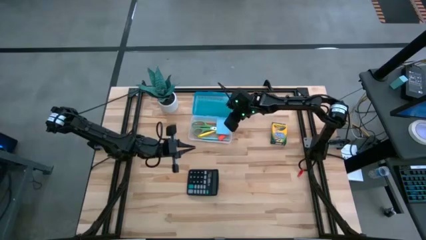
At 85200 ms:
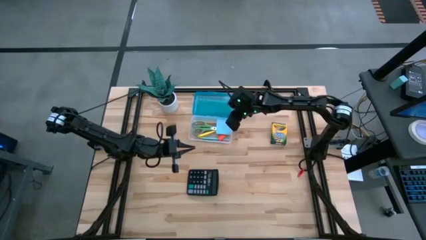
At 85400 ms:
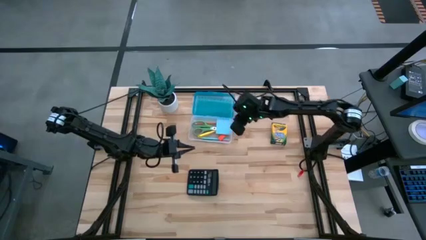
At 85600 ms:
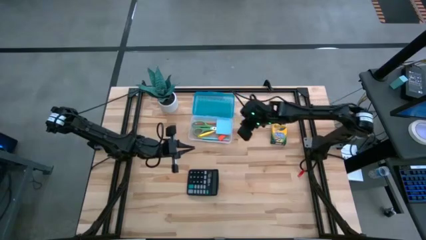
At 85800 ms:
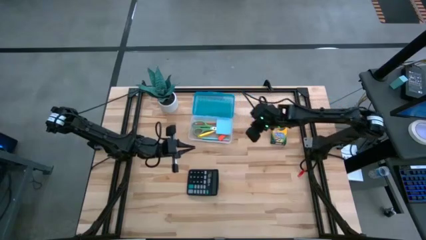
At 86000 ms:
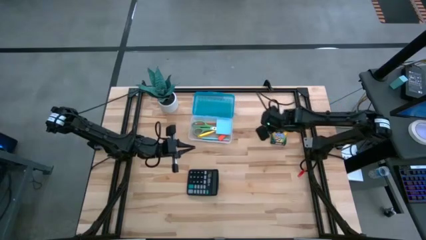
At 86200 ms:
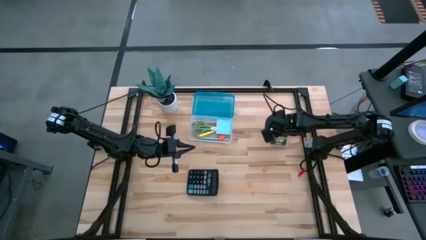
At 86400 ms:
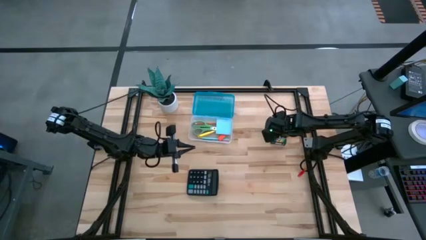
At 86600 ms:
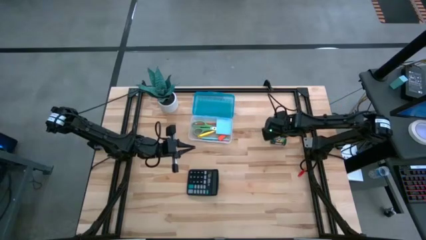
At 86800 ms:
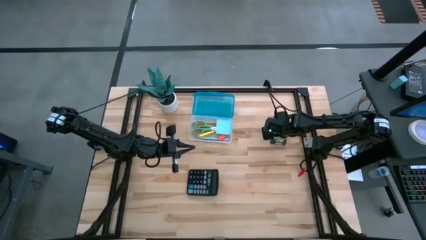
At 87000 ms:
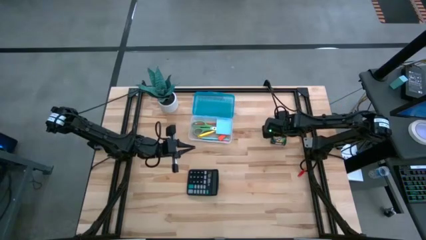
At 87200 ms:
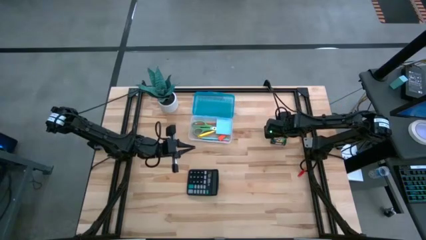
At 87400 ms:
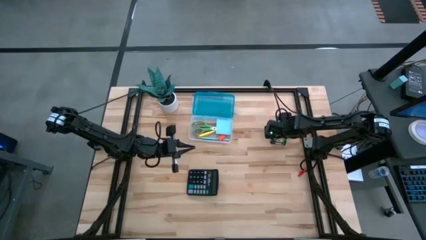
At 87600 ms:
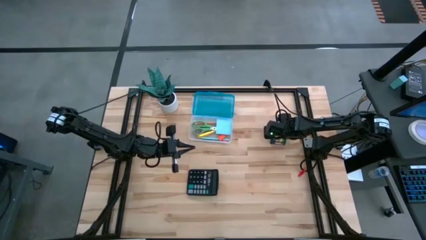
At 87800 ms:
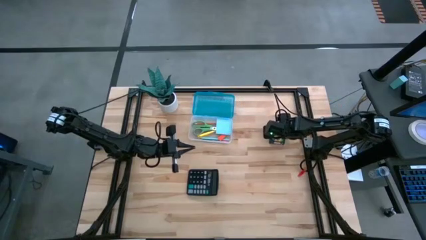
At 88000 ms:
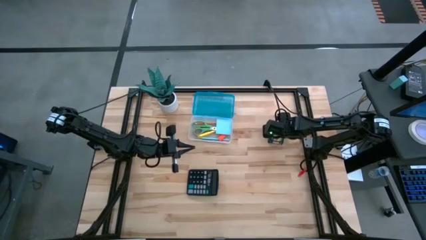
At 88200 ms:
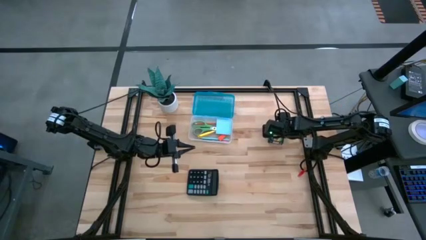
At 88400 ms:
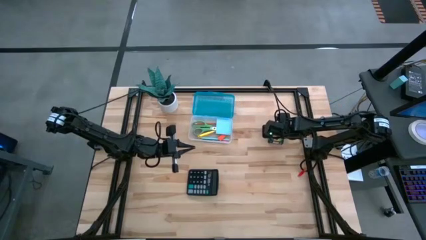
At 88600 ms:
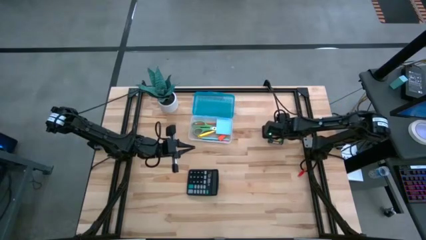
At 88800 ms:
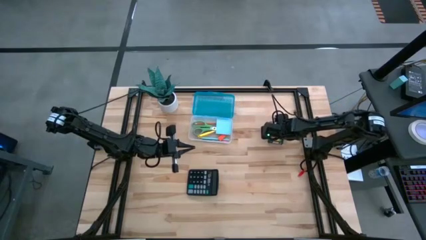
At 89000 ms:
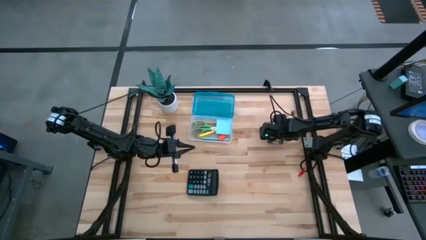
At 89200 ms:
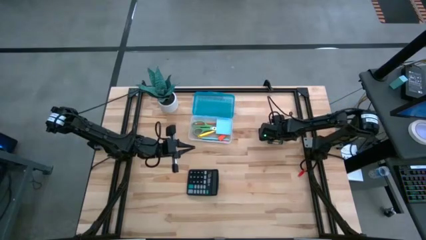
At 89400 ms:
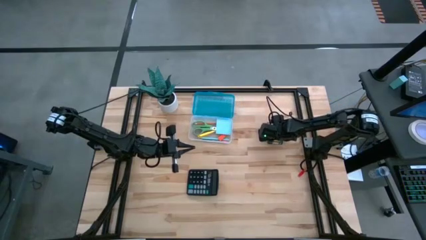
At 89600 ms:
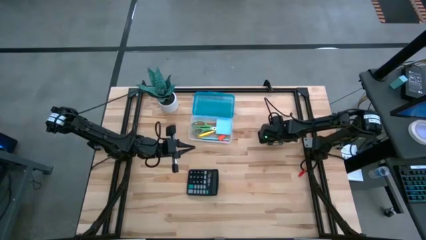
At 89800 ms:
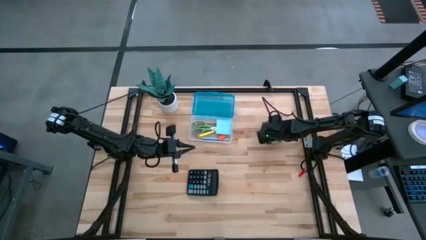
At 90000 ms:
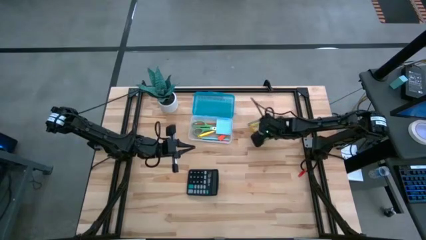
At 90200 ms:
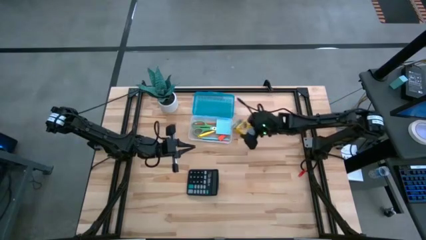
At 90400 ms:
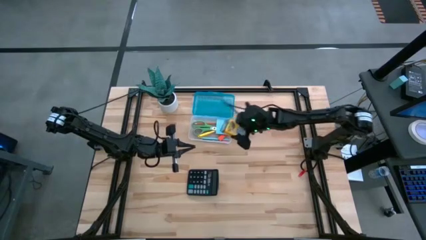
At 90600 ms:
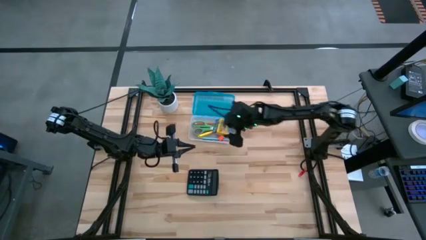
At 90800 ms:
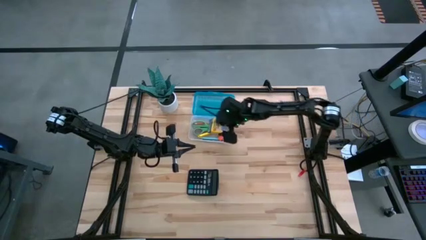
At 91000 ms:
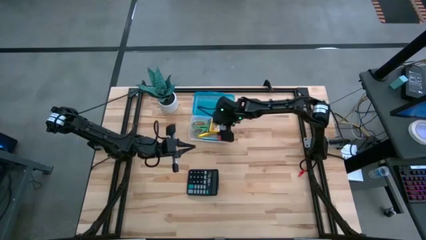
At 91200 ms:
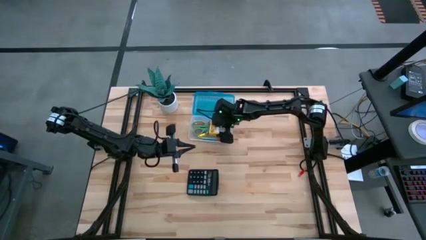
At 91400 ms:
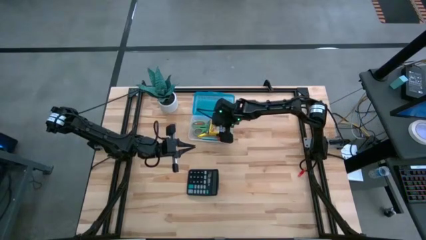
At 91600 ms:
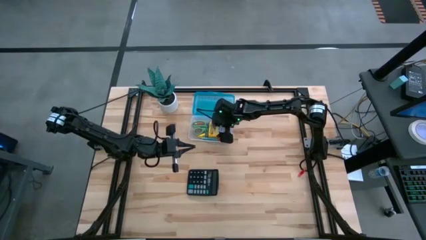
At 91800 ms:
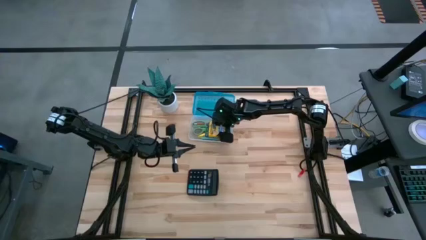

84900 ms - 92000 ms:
Task: Pack school essentials
Put the crayon box into the supply box

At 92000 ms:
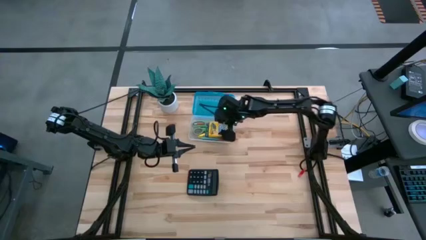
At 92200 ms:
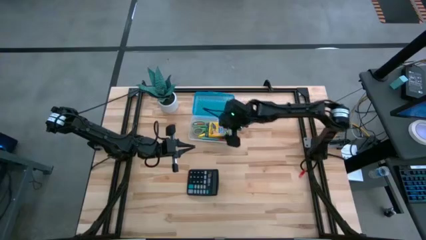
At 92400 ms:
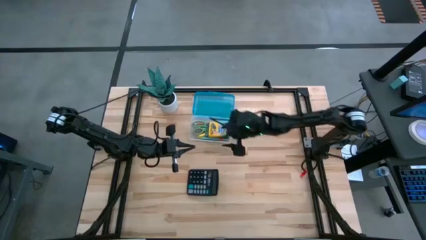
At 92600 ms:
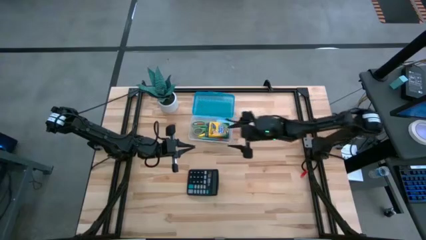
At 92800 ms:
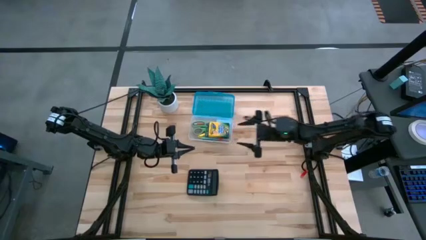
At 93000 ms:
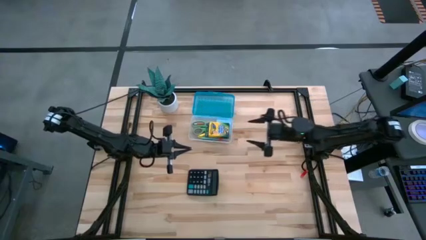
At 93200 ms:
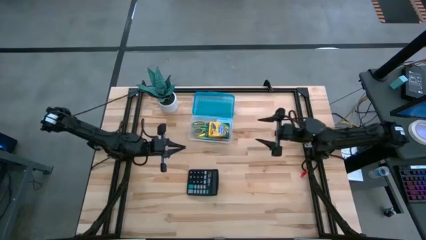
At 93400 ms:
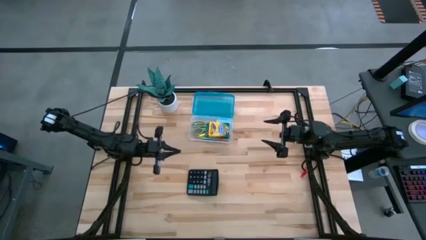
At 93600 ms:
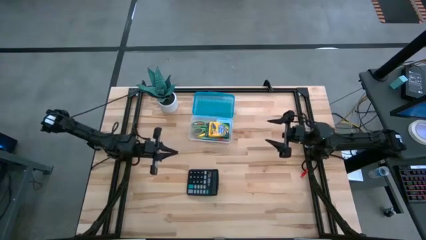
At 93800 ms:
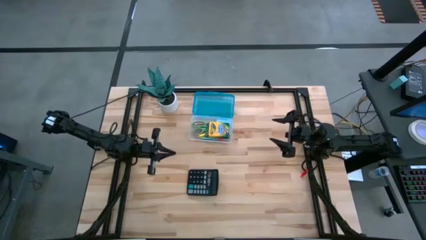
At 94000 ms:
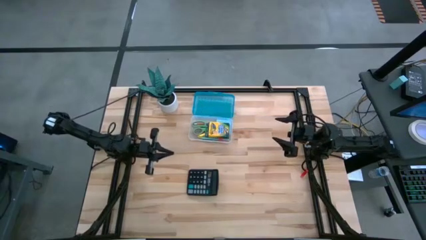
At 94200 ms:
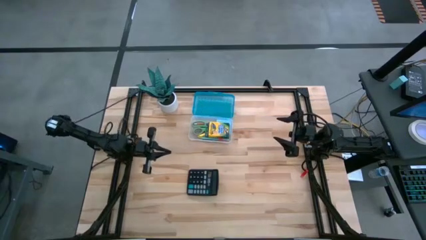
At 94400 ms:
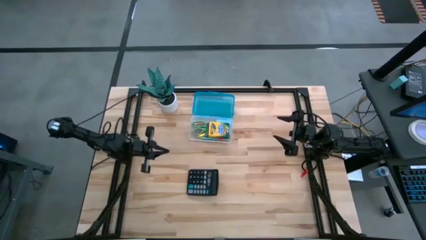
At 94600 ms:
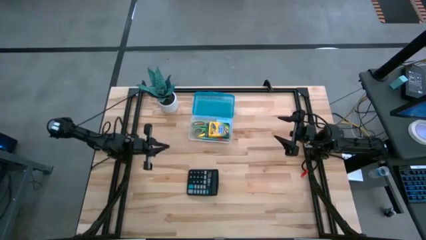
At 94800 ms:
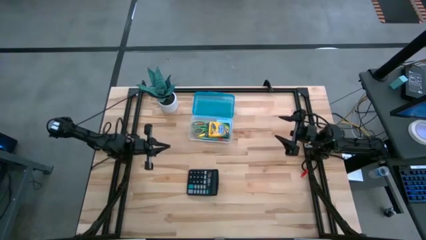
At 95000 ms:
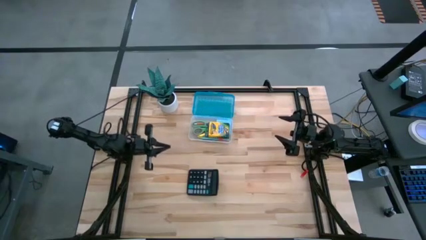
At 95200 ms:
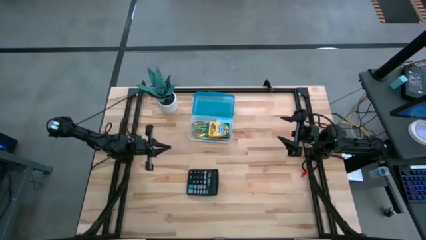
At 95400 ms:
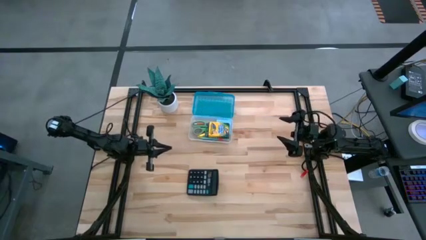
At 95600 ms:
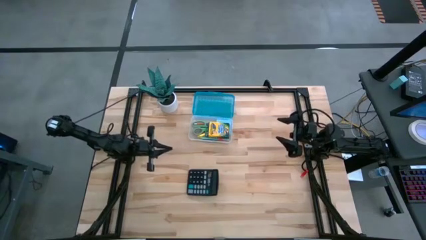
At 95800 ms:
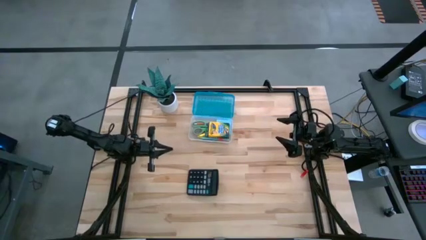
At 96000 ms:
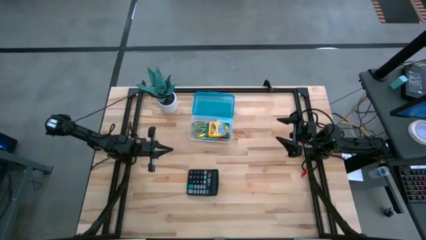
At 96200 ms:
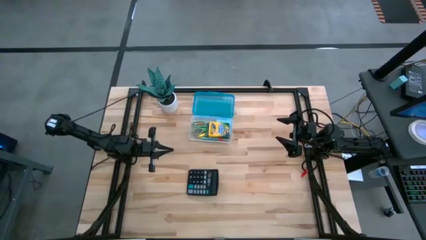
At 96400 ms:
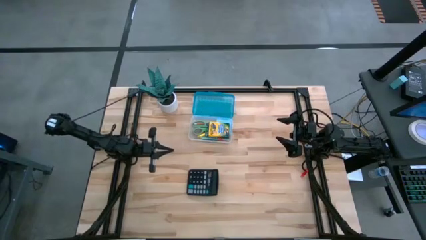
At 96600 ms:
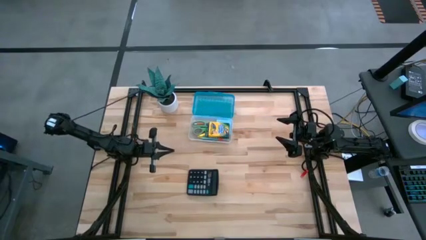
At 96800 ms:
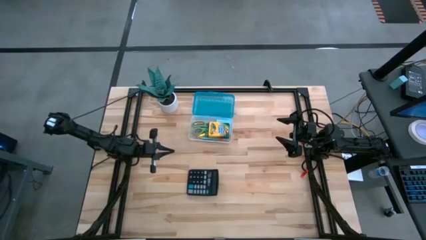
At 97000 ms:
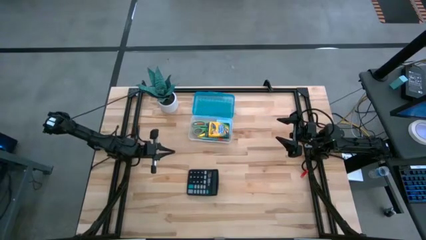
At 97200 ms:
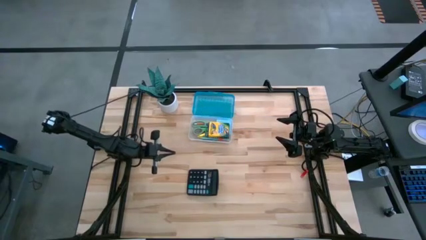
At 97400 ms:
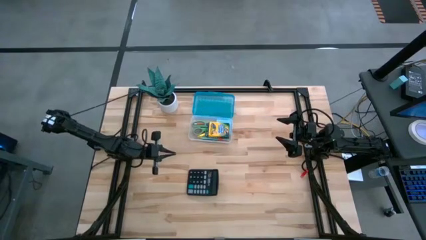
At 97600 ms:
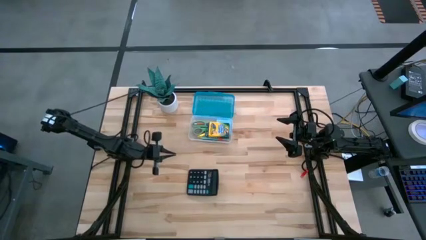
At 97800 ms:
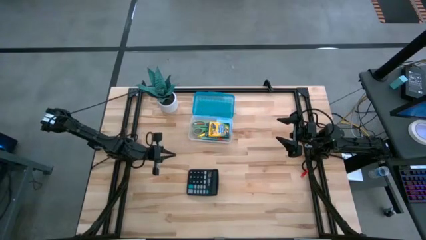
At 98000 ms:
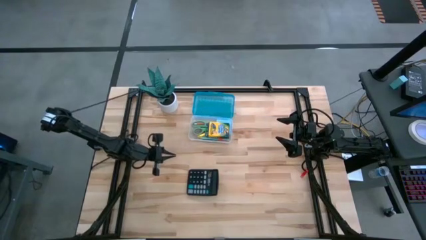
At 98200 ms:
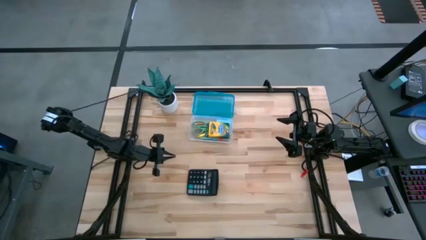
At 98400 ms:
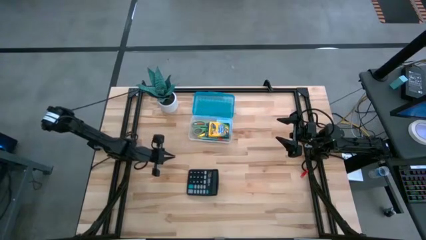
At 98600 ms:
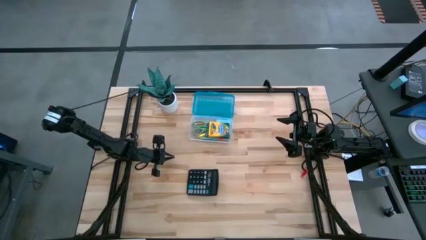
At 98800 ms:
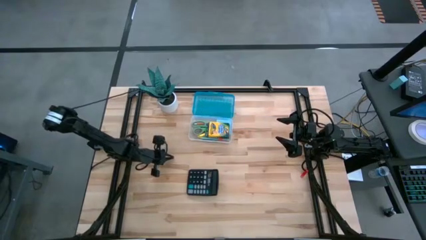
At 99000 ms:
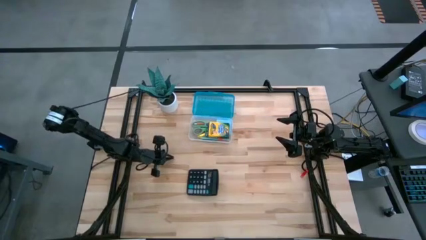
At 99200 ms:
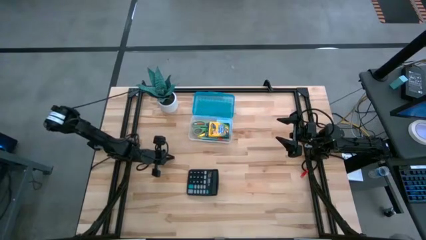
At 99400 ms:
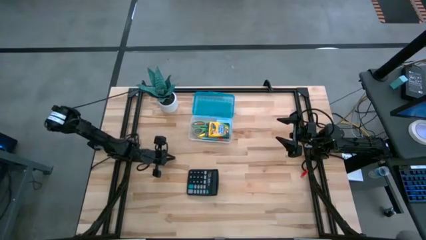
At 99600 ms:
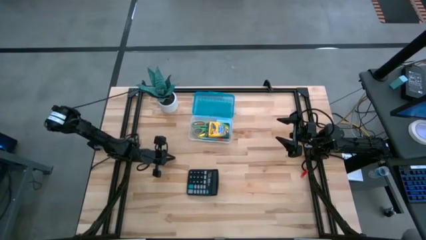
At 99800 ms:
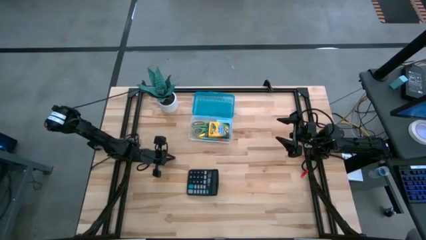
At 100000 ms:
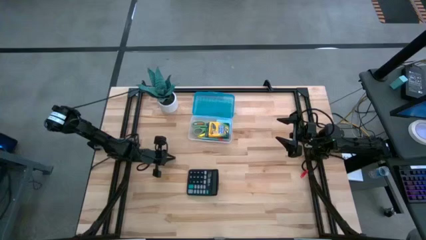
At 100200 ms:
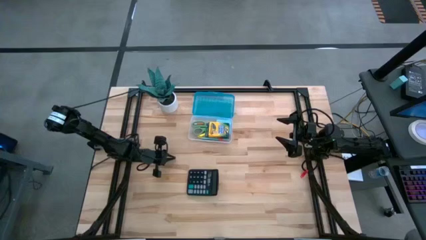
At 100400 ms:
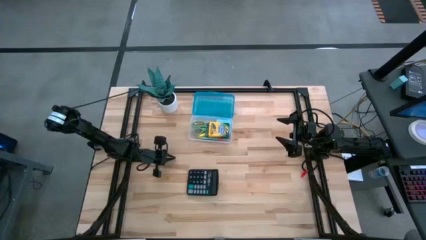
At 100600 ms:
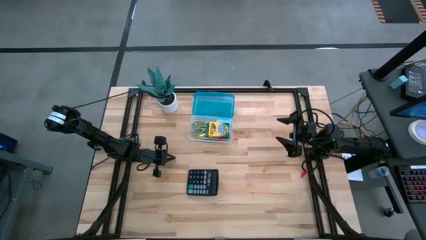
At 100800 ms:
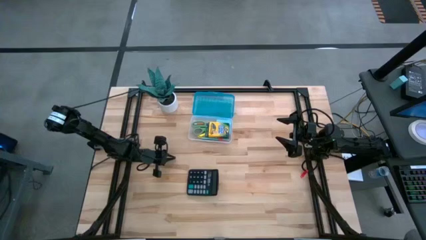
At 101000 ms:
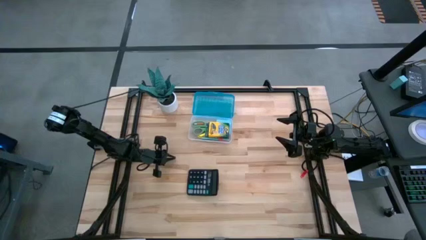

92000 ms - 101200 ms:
Return to Home Position
